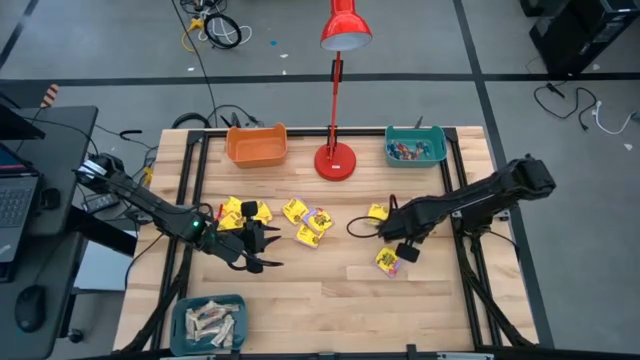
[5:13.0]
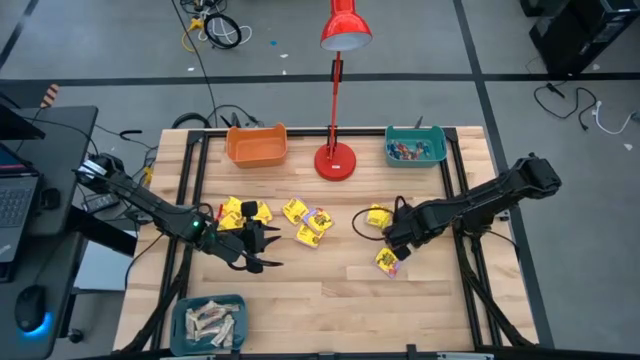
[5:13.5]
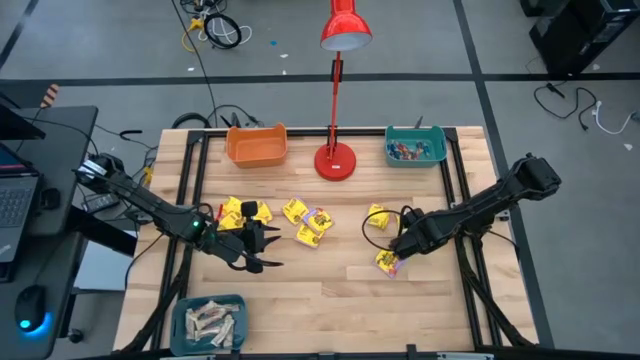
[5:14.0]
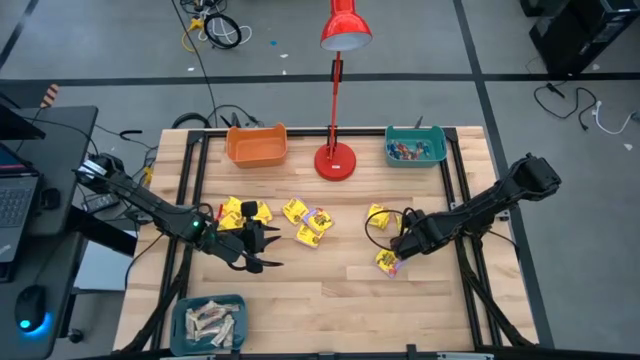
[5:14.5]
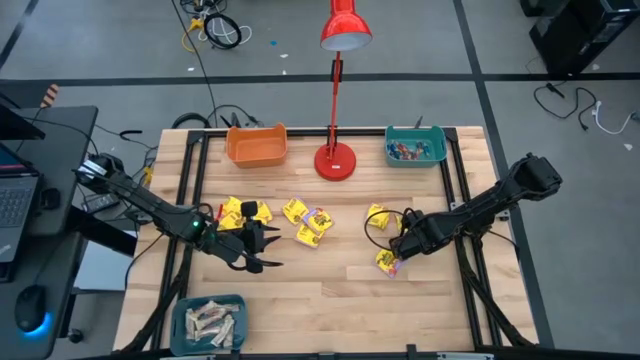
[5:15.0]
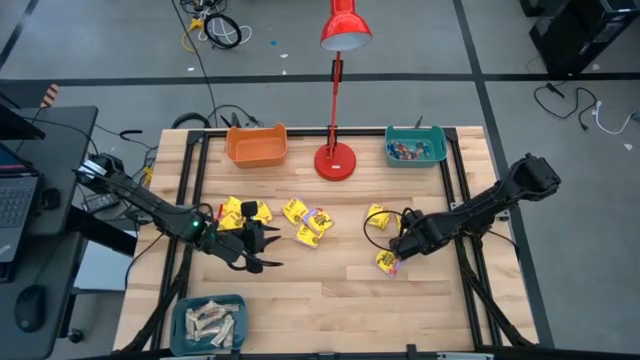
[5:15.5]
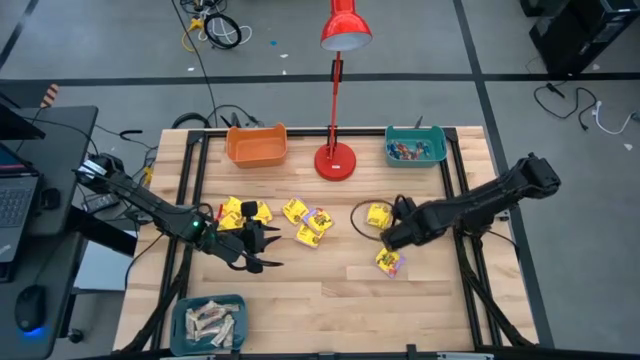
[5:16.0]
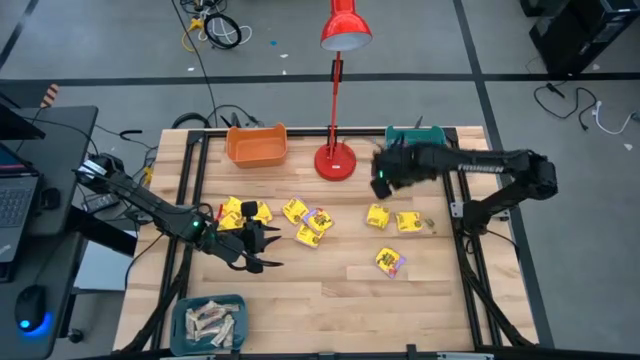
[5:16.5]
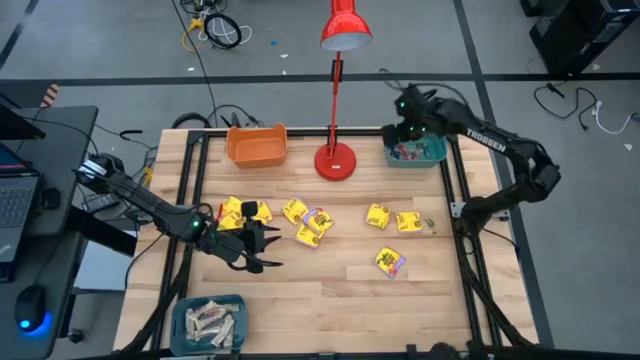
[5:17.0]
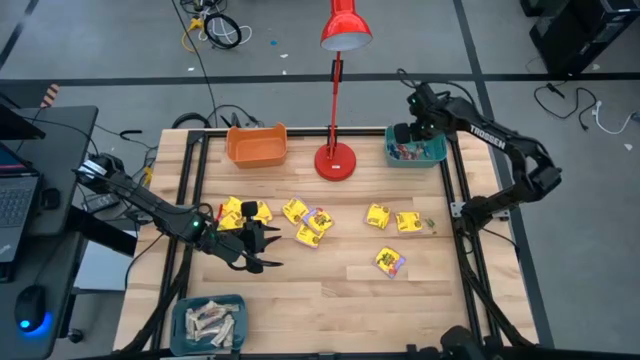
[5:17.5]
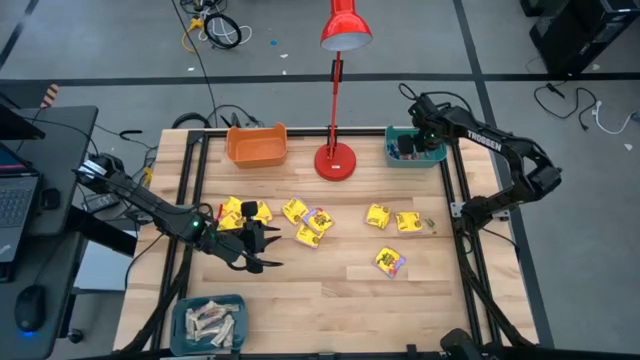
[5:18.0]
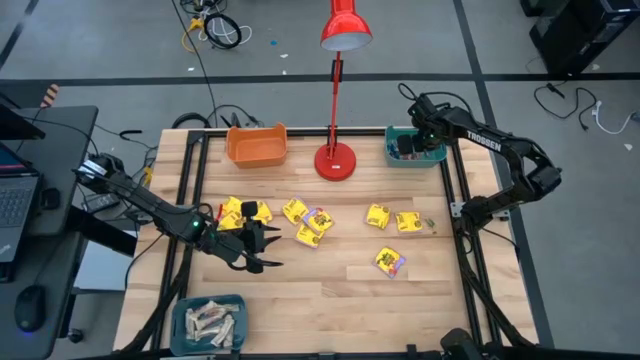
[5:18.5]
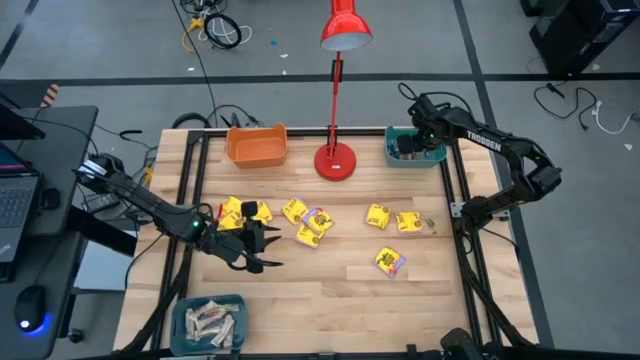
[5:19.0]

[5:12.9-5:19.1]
Task: Sort candy
Put the small green candy into the green bin

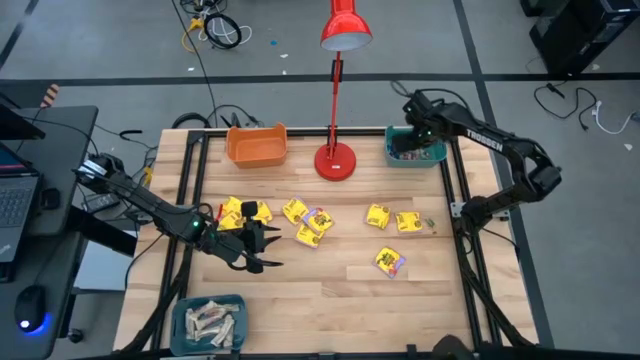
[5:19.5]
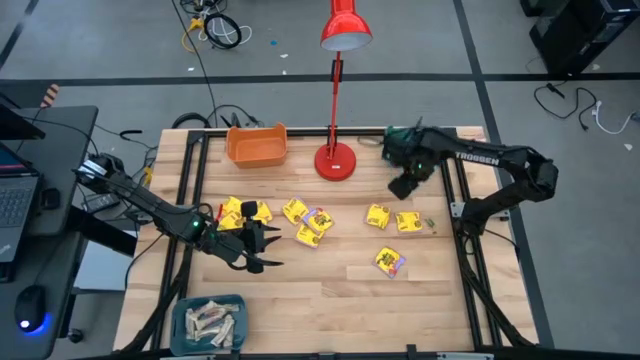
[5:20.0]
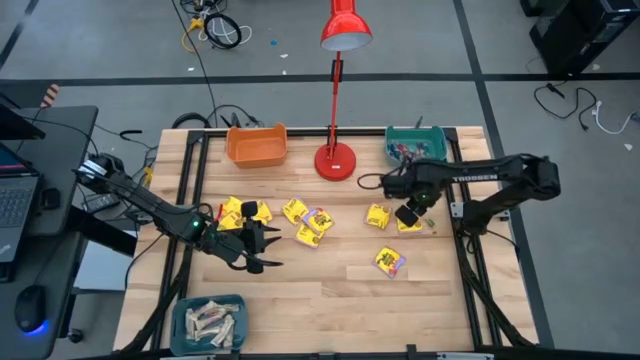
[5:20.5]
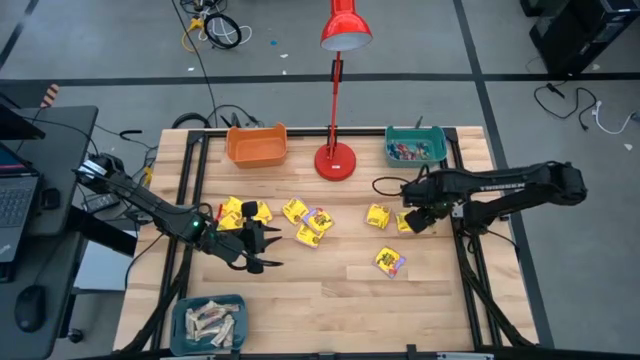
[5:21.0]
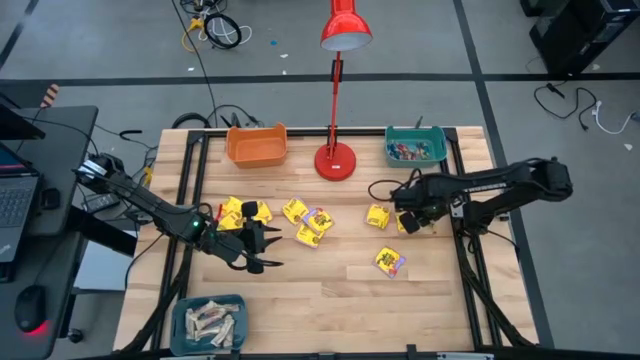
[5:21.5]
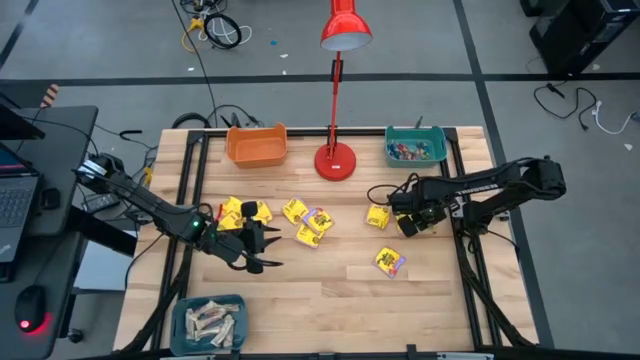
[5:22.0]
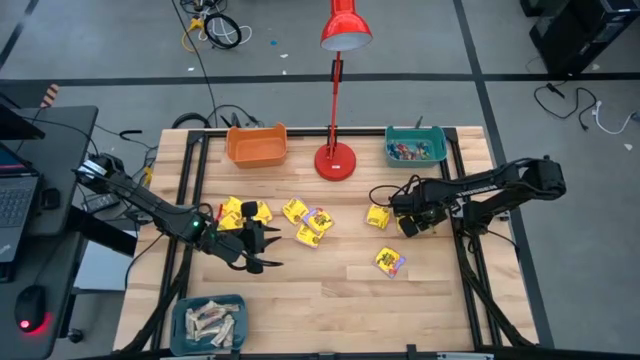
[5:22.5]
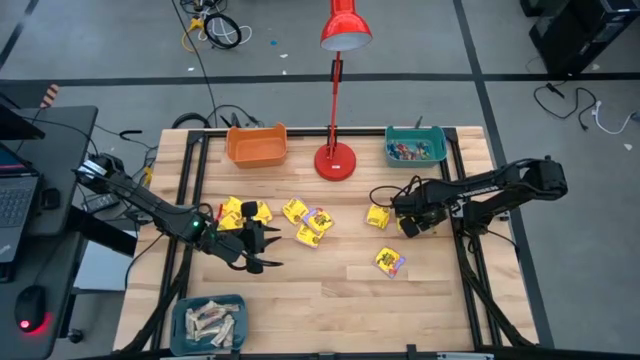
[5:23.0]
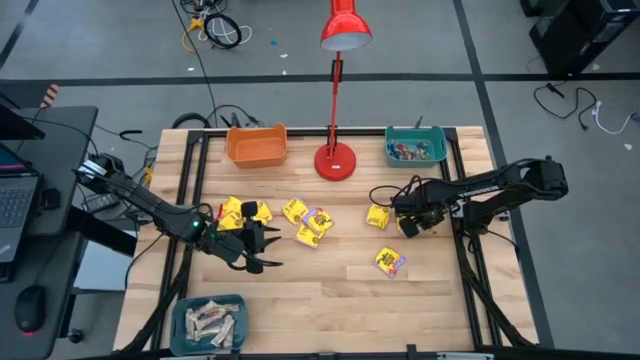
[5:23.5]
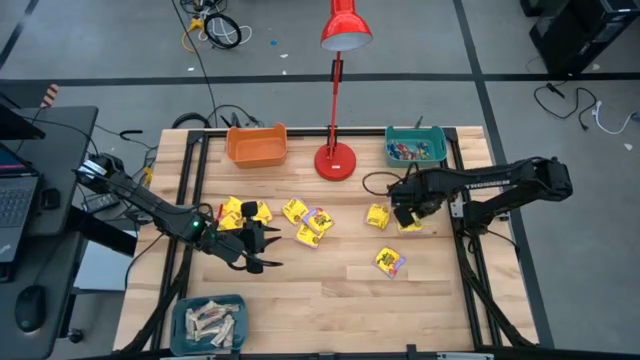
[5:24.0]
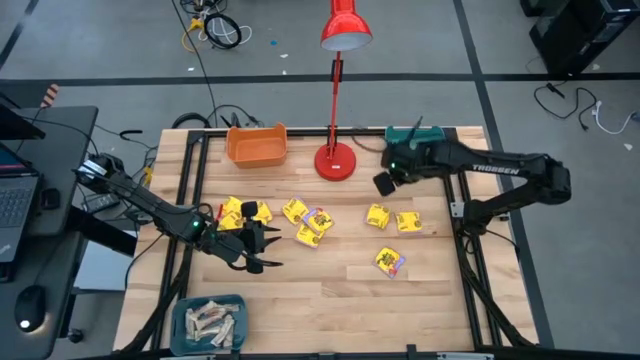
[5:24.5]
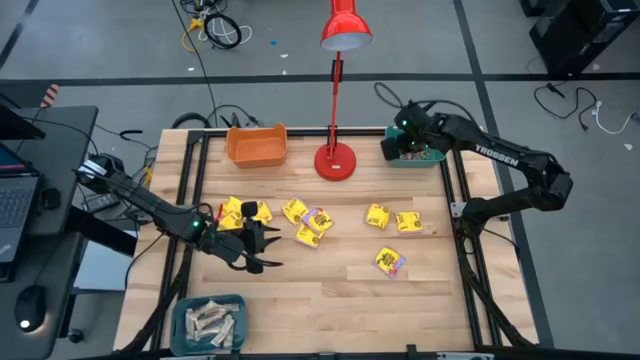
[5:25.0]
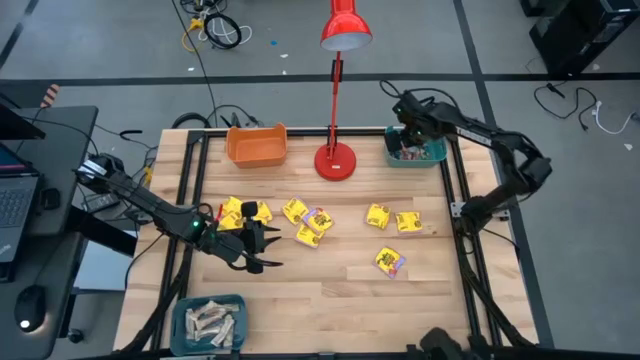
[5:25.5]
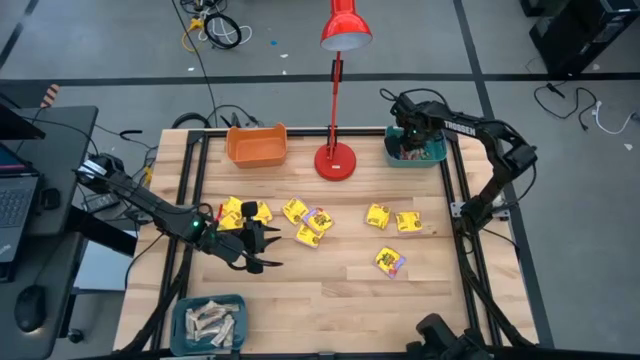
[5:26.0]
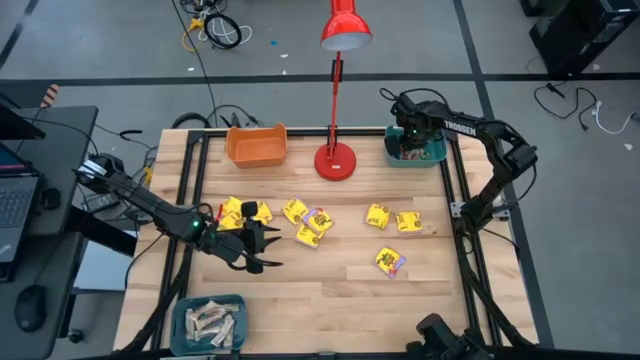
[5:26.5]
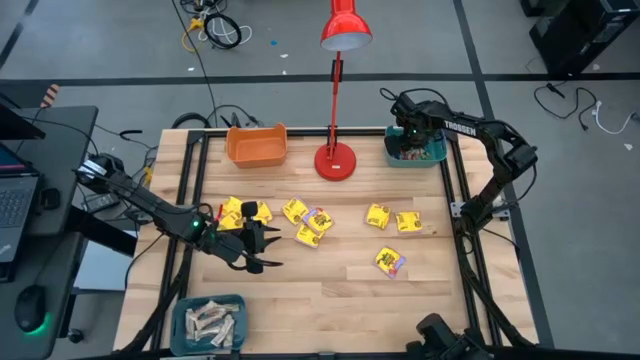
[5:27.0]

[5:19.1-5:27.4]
Put the small green candy into the green bin

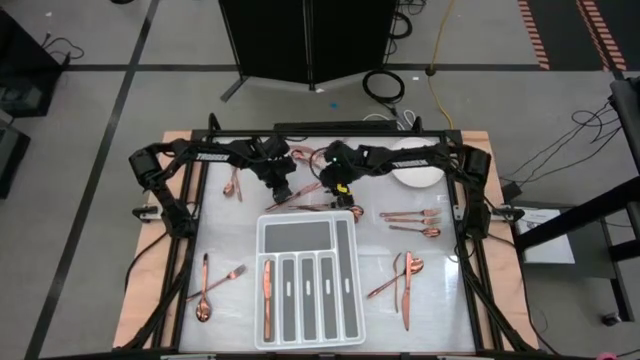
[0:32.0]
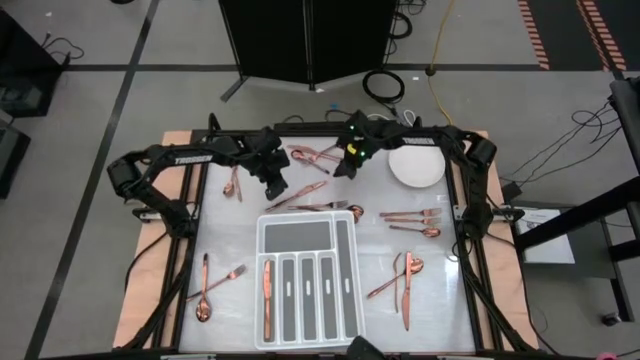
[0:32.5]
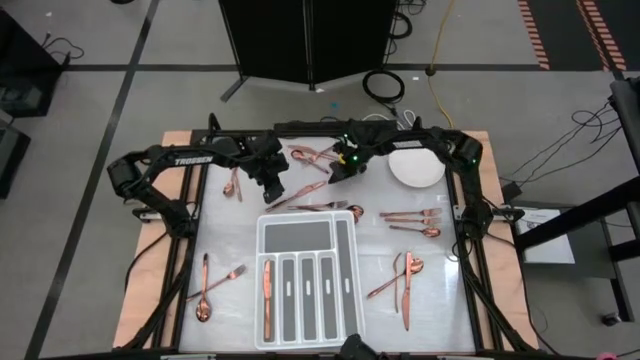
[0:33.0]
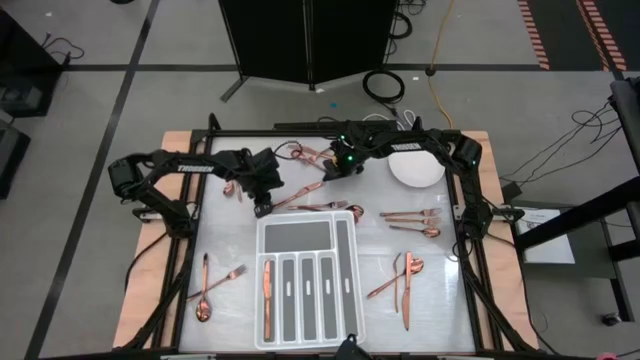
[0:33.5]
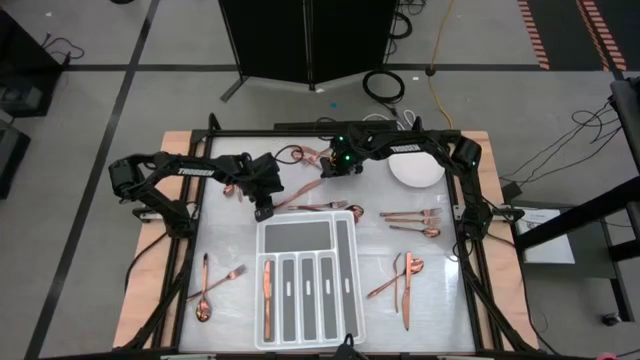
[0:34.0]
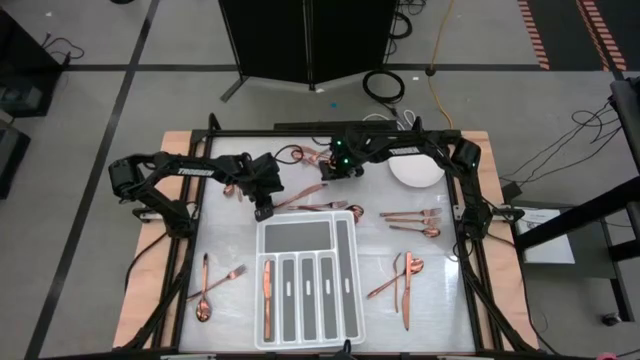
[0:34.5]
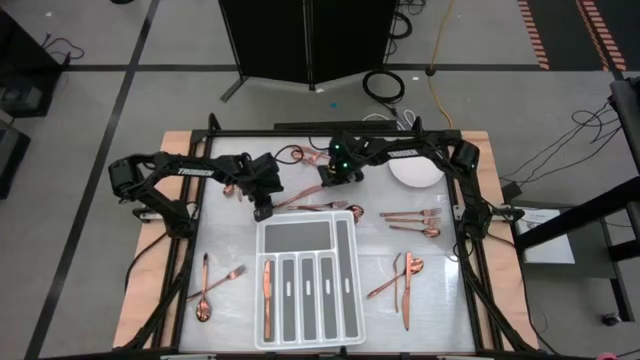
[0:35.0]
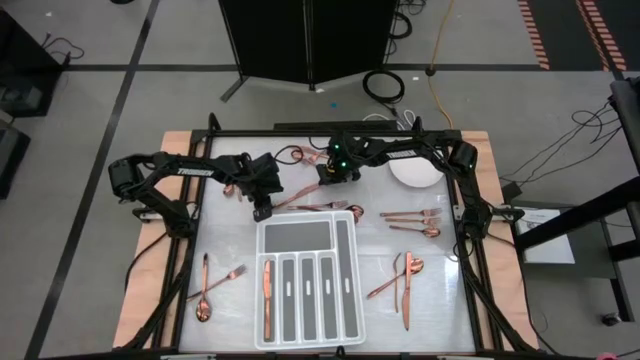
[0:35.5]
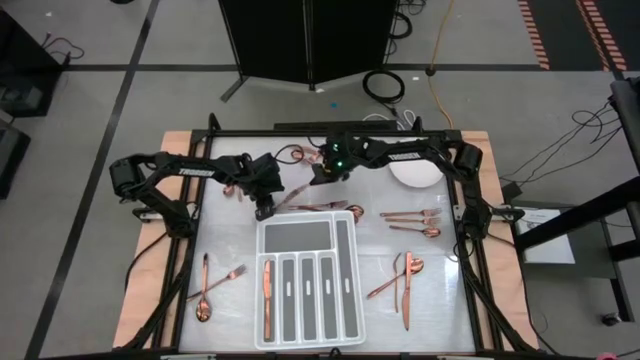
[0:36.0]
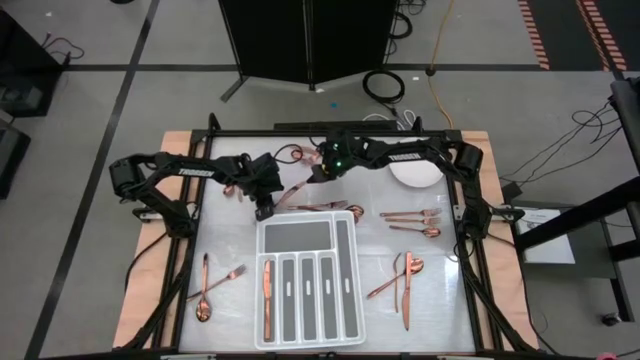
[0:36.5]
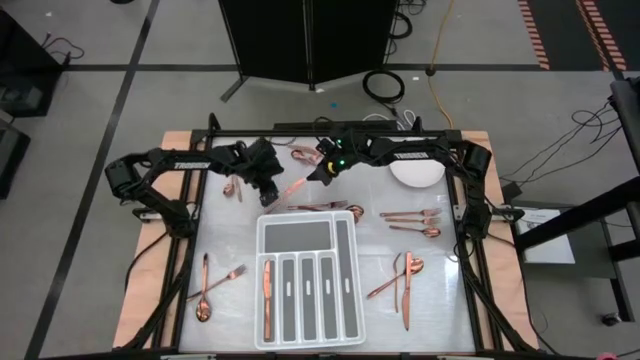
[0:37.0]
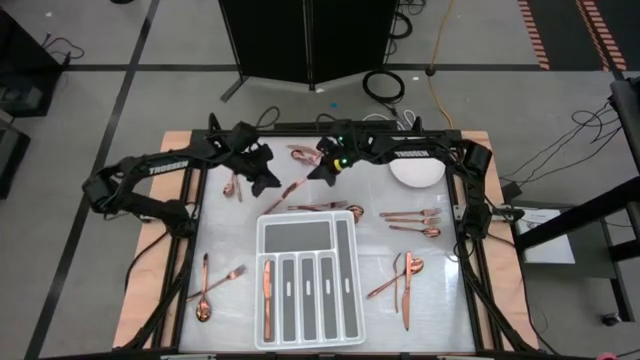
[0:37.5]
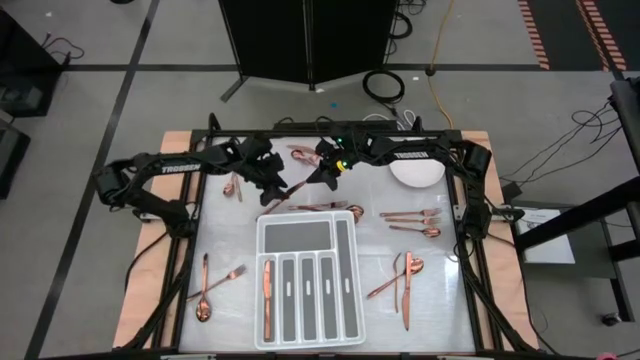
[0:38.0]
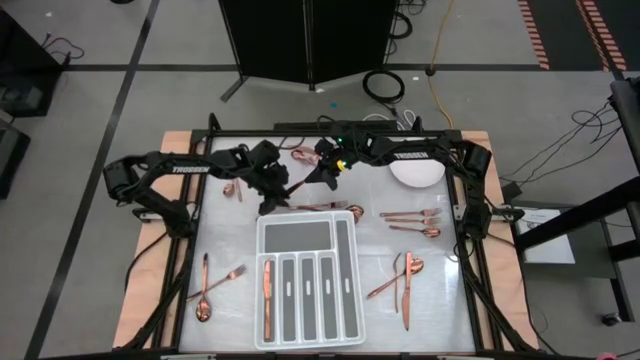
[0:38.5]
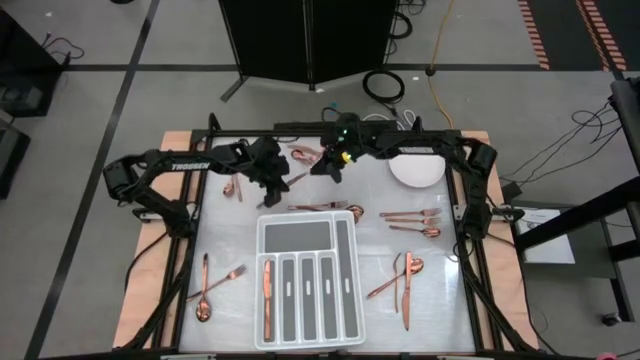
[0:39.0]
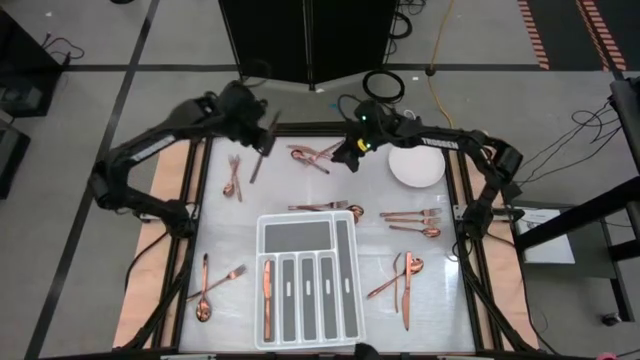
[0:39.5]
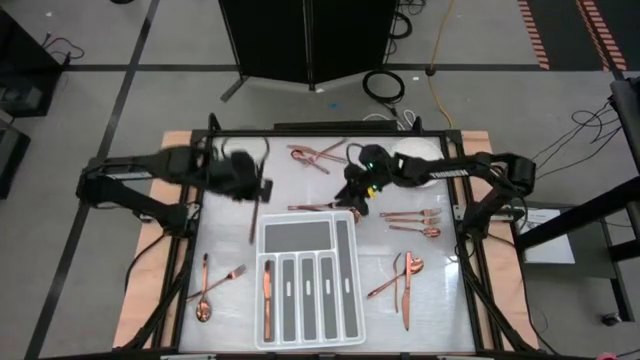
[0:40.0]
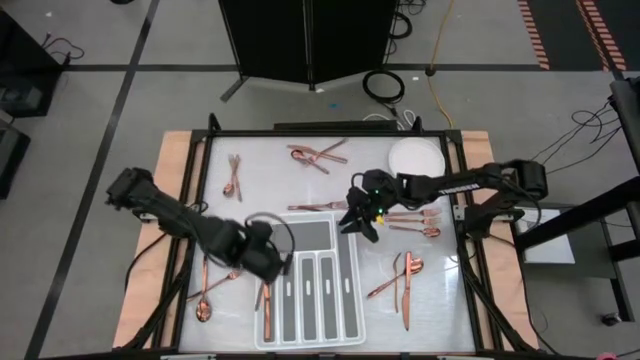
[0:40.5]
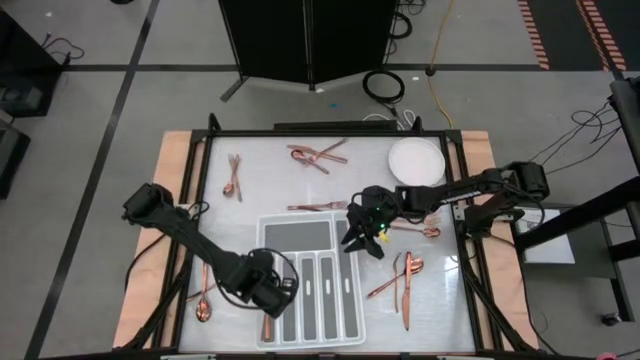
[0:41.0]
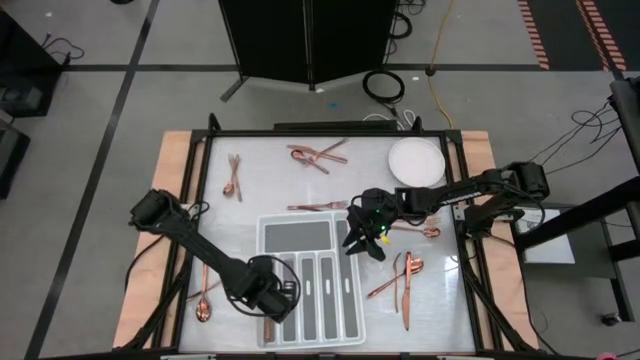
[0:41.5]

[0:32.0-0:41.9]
Task: Sort silverware
Put the top left knife into the silverware tray
